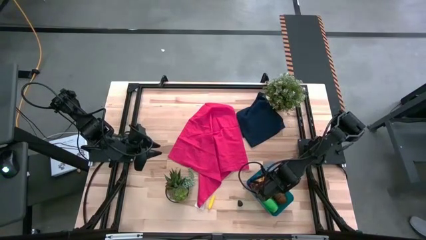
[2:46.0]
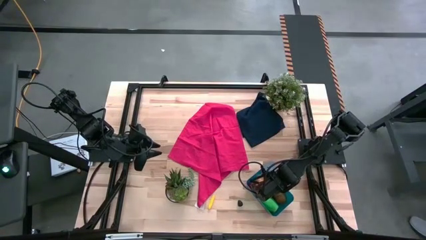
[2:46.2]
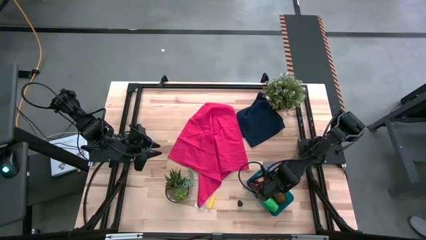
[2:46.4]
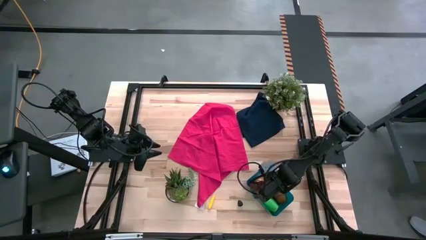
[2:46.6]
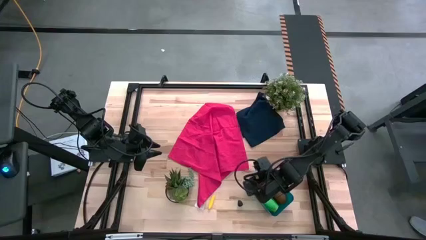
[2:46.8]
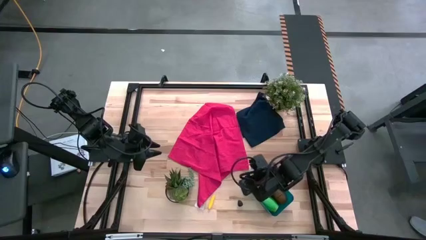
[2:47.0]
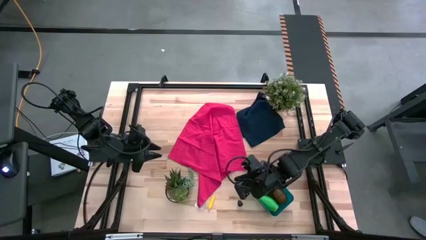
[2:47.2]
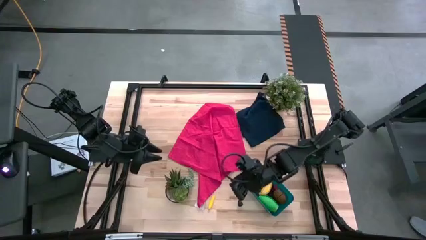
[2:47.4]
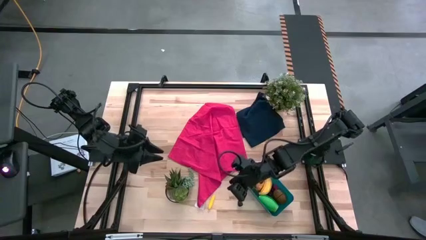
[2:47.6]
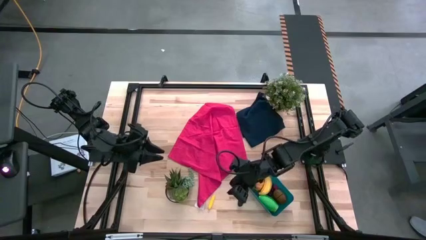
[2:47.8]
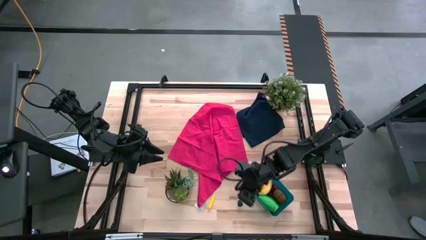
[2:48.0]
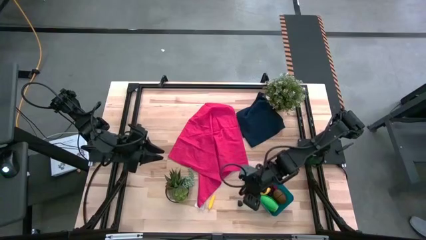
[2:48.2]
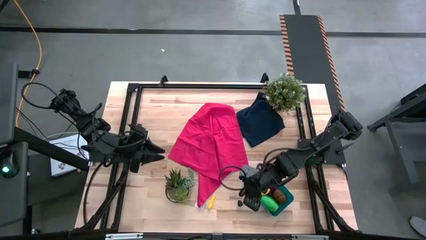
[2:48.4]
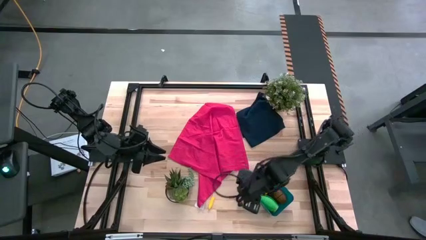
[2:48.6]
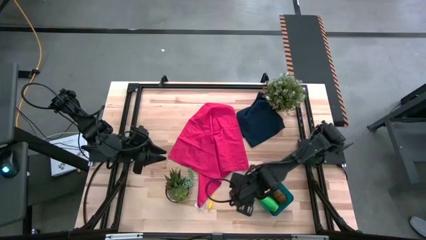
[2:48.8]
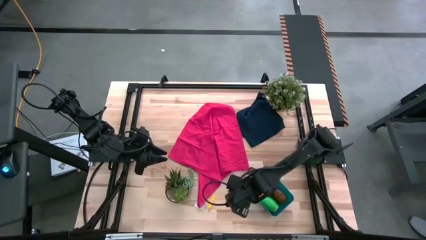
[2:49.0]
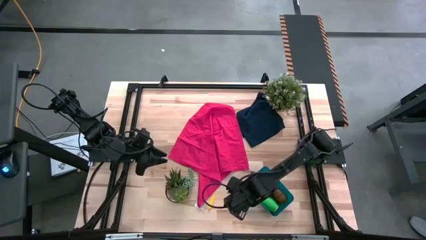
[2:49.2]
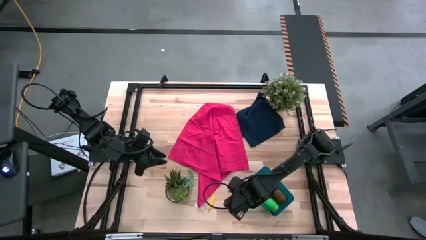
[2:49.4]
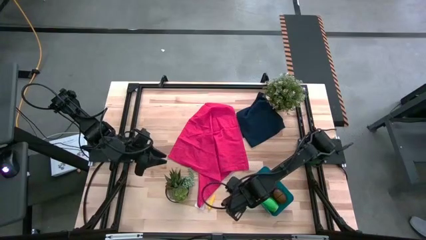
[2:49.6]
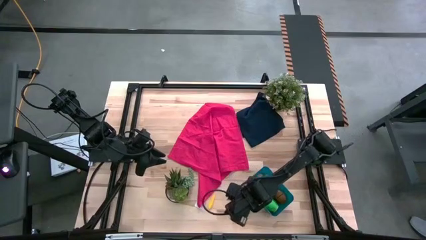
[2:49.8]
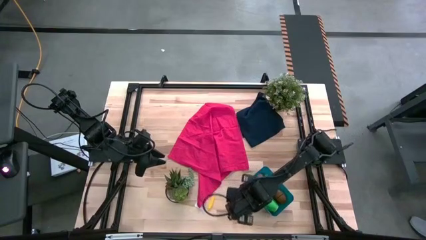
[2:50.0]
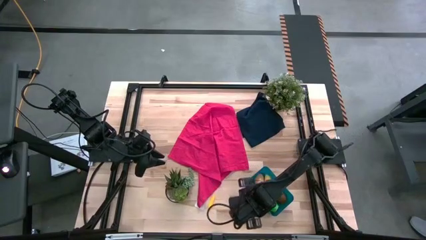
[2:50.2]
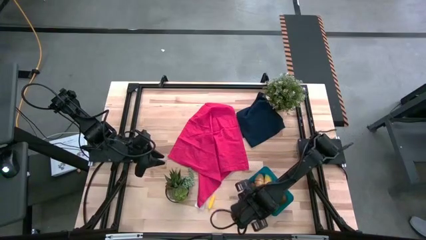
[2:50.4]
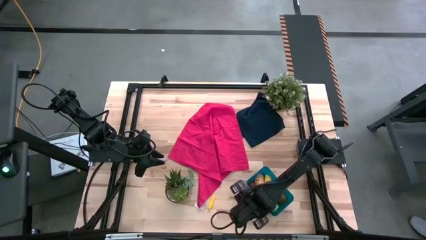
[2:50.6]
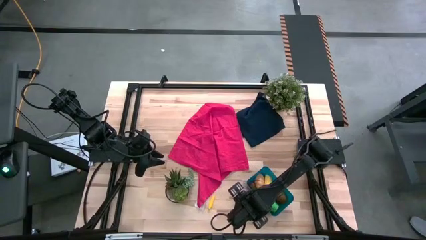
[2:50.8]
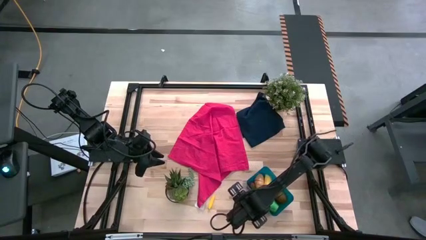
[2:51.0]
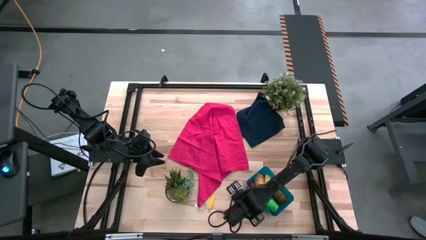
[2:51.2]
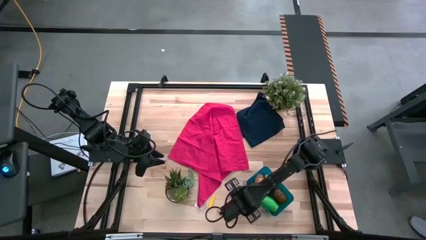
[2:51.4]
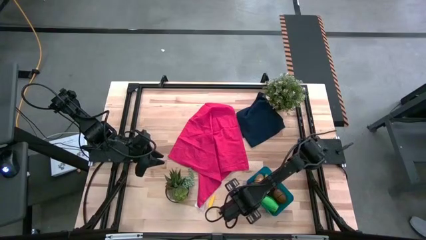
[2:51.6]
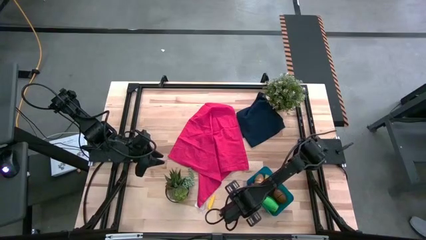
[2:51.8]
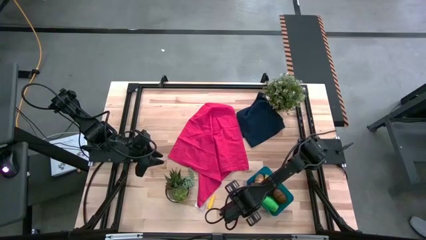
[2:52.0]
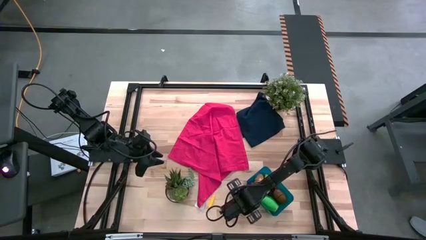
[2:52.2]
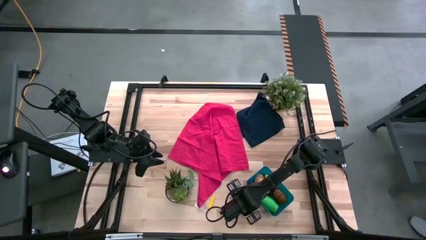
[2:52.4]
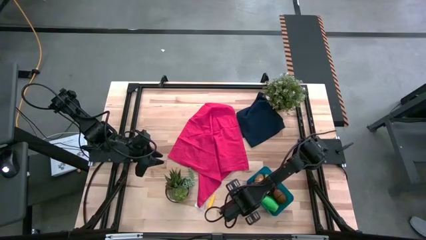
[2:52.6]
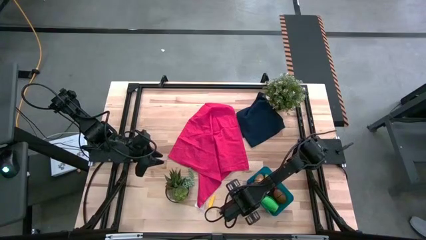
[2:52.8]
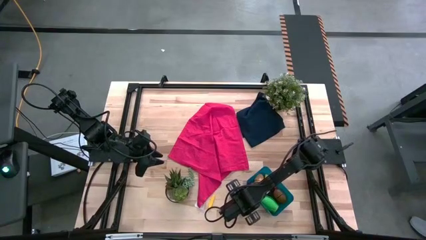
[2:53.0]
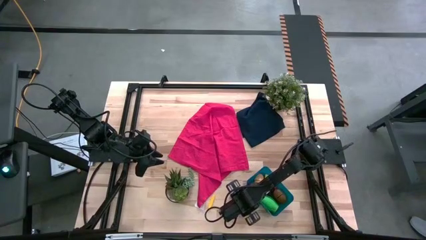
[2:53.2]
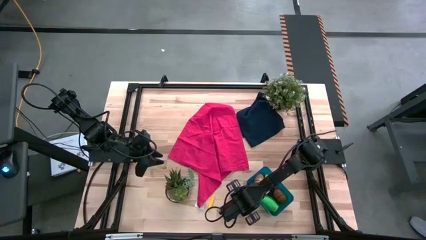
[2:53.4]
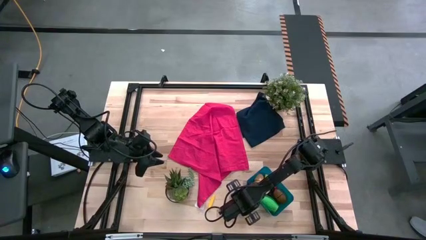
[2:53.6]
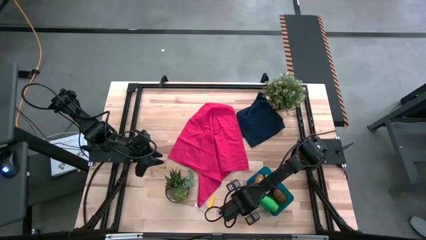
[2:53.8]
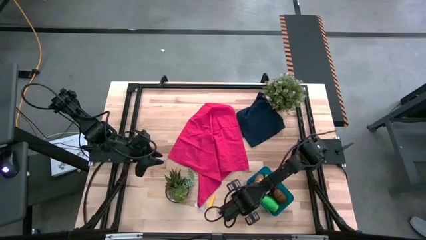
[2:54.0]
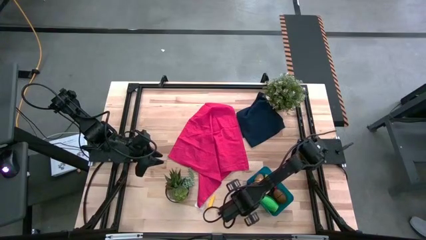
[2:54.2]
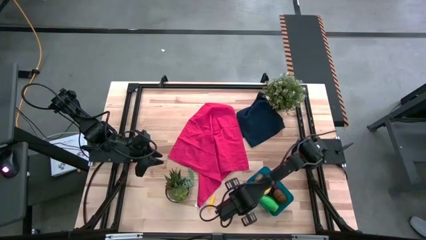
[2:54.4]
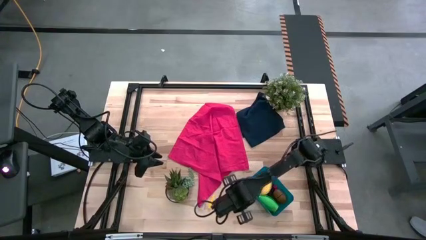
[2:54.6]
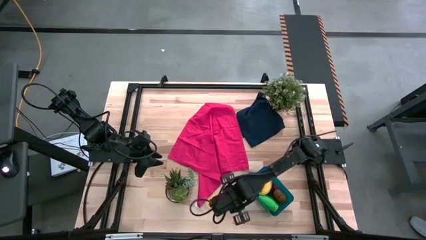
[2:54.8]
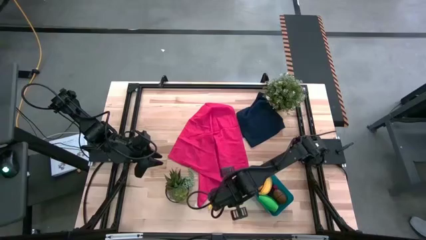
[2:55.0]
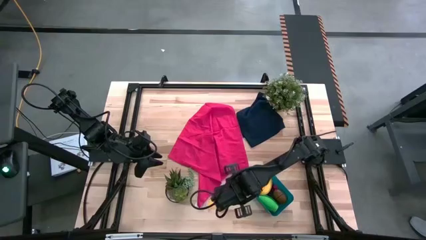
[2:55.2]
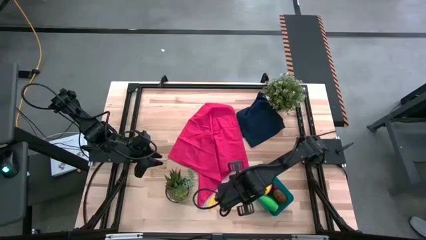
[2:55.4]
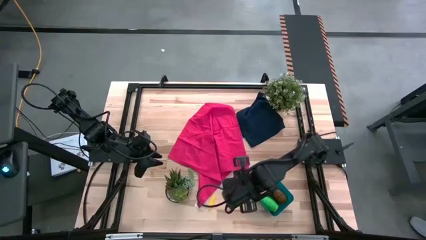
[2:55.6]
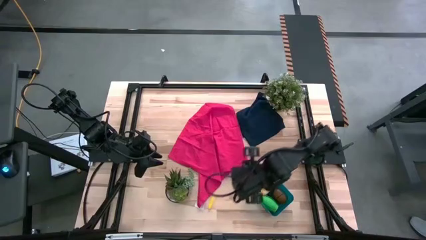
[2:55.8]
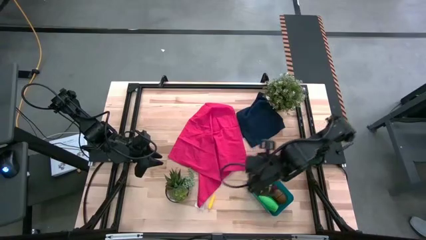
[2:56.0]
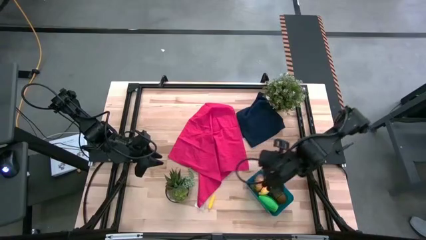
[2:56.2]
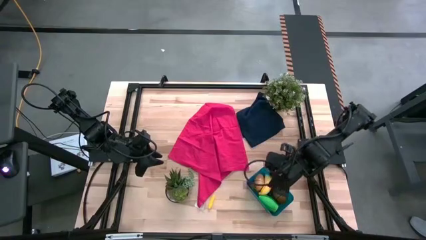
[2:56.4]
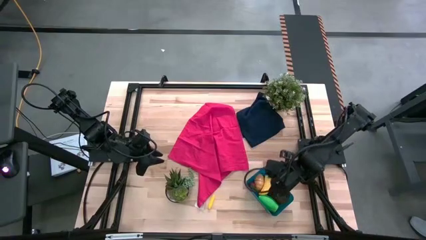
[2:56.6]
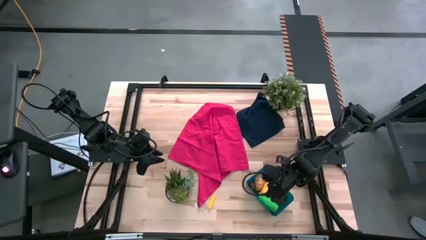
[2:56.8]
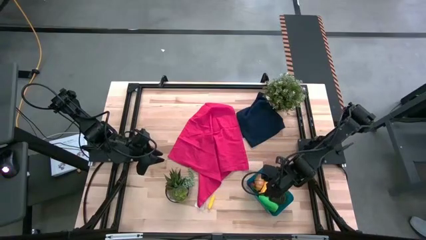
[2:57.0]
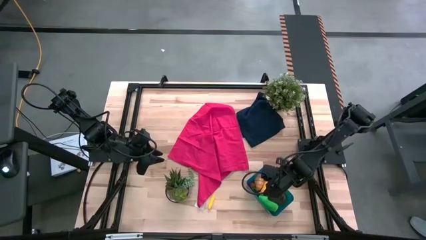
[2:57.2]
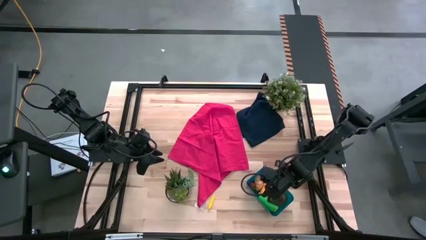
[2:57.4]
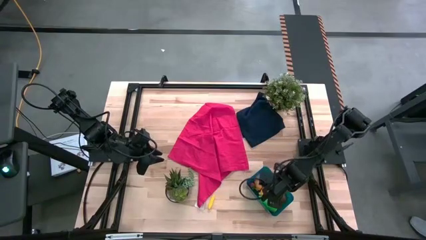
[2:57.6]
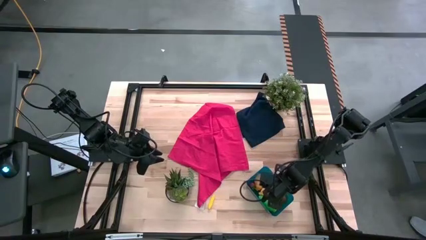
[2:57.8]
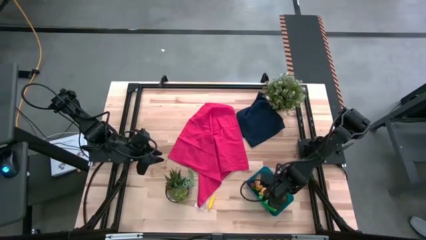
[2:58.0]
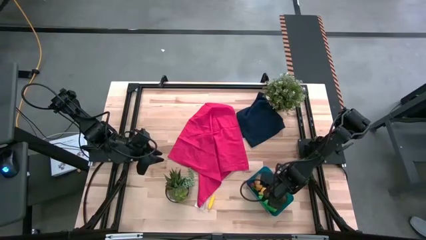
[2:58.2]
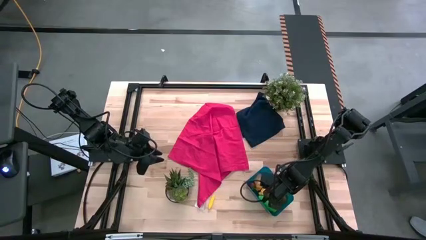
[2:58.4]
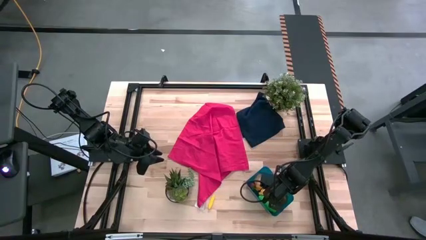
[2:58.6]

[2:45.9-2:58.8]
Task: Pick and placing Produce into tupperware
Put the blackberry into the blue bin
